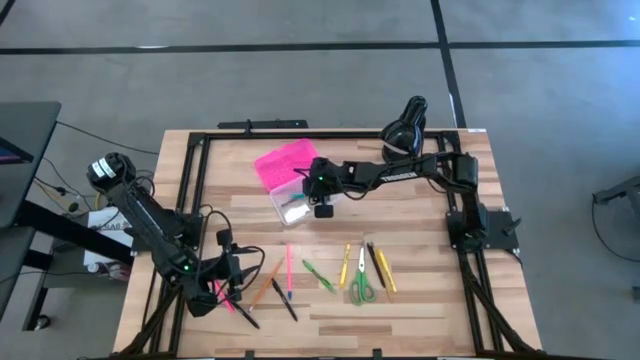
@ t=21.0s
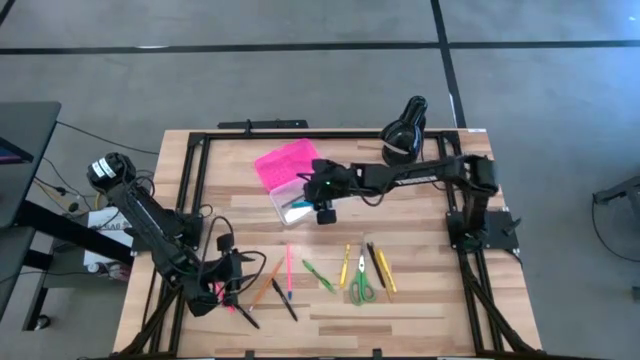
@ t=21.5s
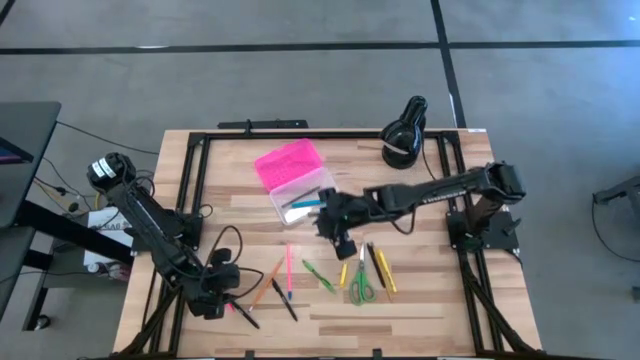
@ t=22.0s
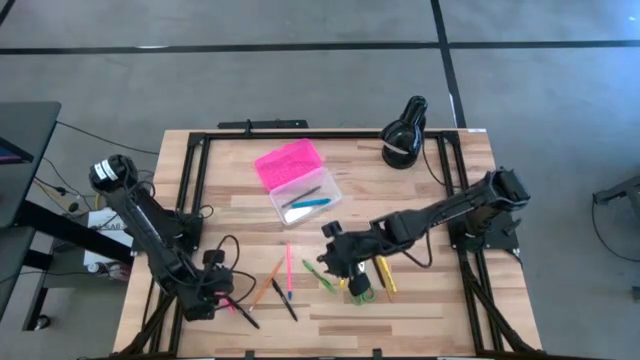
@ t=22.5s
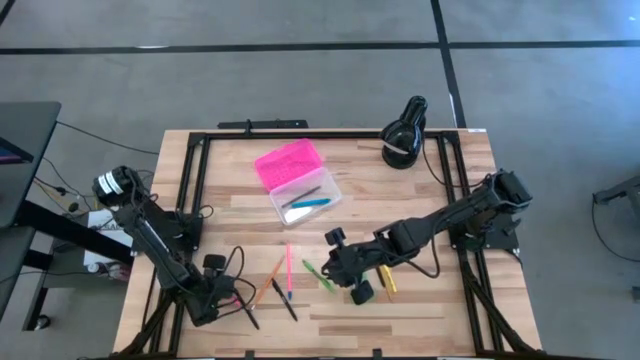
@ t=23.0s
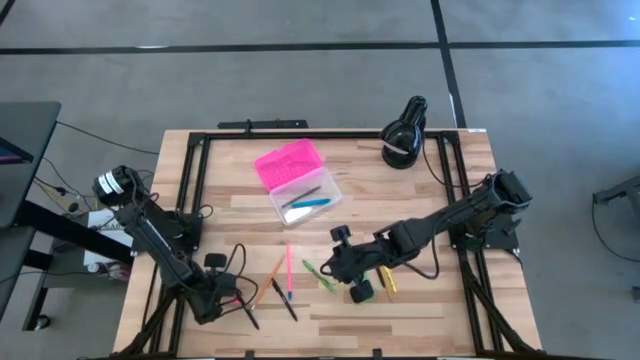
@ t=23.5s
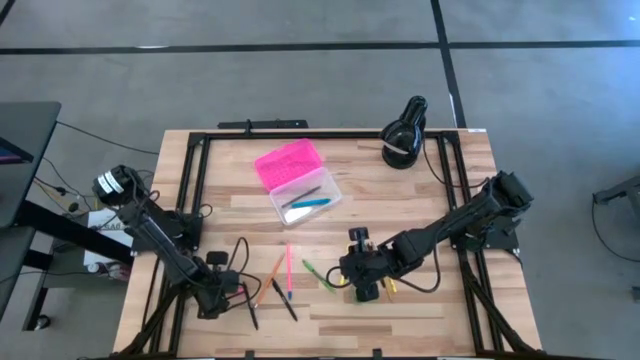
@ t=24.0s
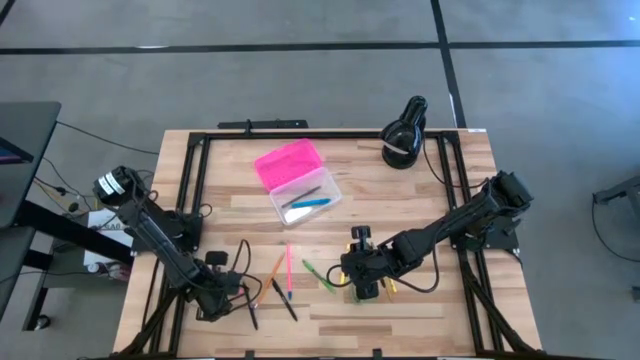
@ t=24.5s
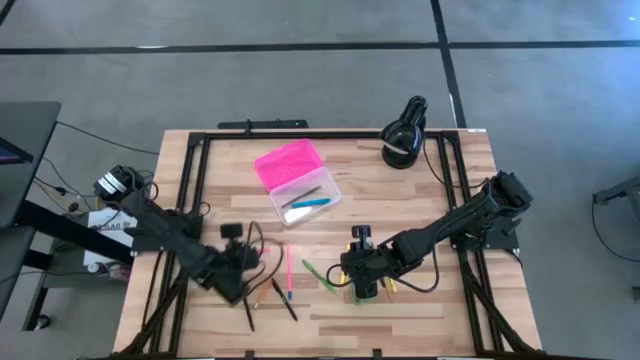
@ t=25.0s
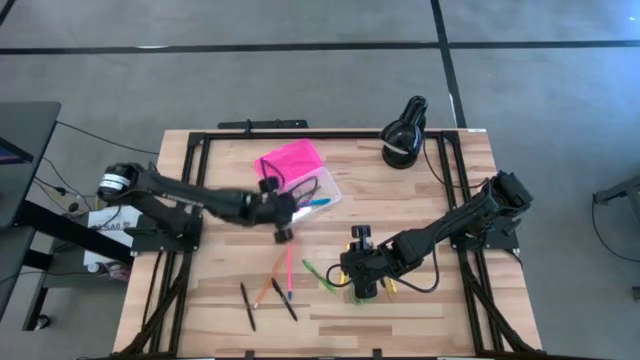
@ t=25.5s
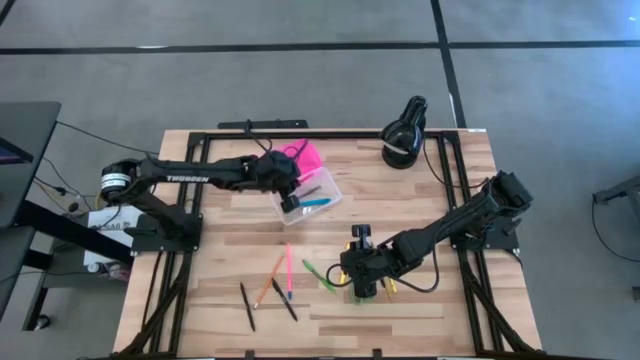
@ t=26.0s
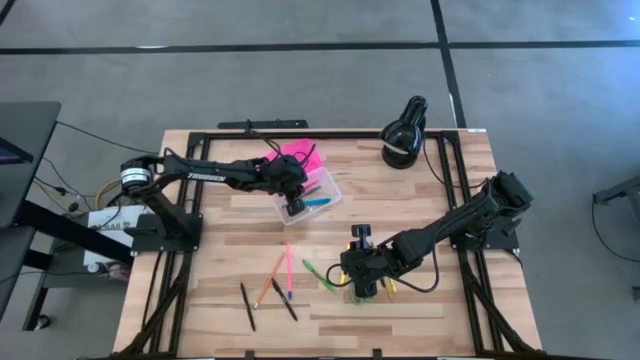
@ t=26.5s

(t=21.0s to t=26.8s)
Task: Pick & place school supplies into a supply box
Put the pink pen into the black supply box

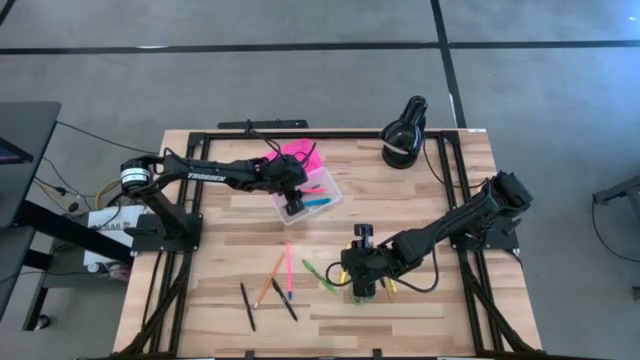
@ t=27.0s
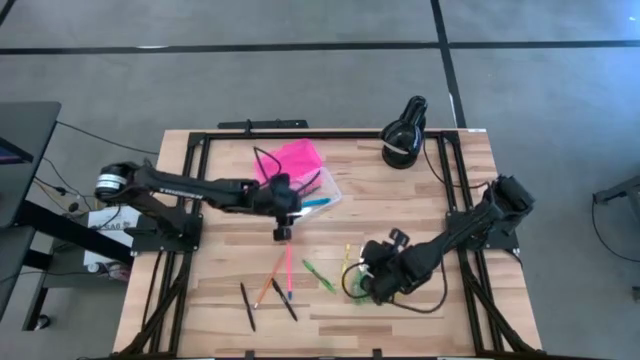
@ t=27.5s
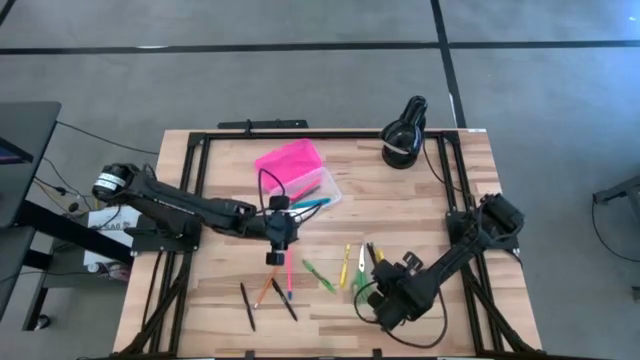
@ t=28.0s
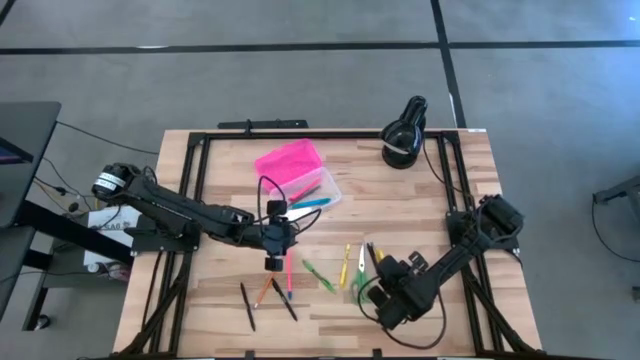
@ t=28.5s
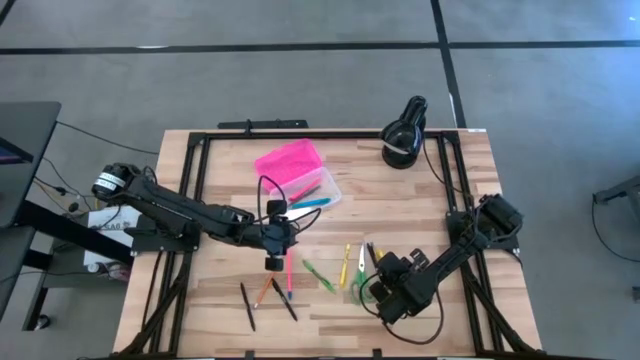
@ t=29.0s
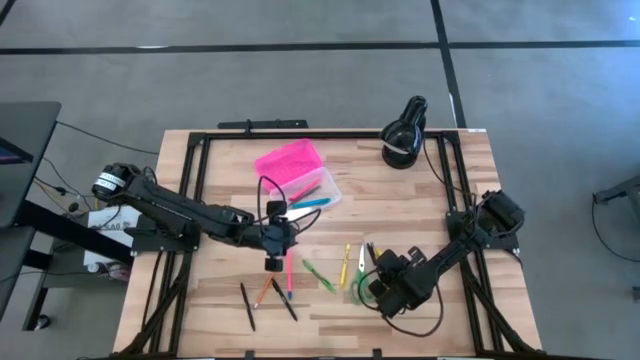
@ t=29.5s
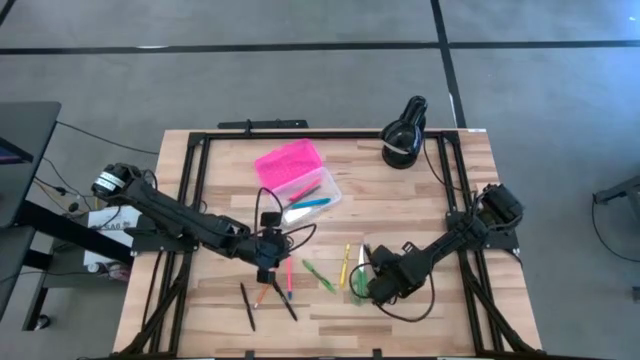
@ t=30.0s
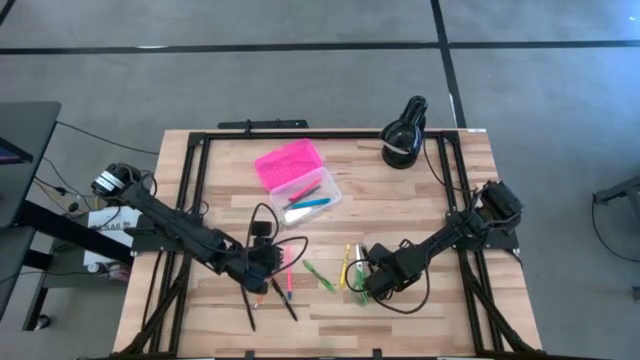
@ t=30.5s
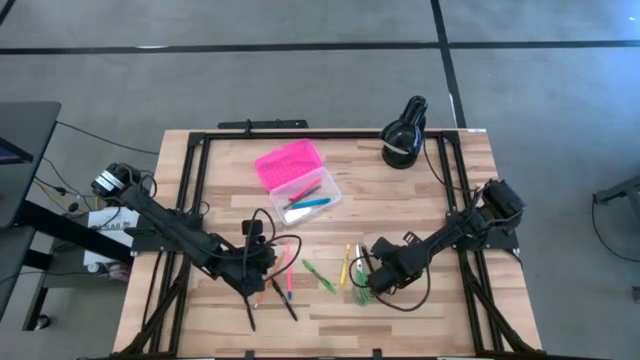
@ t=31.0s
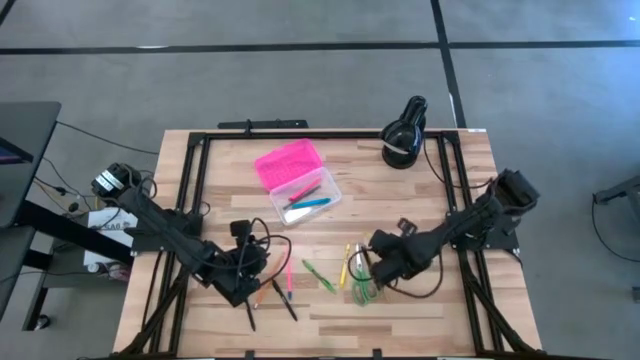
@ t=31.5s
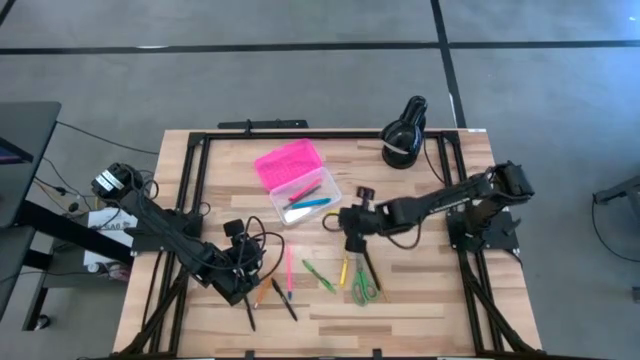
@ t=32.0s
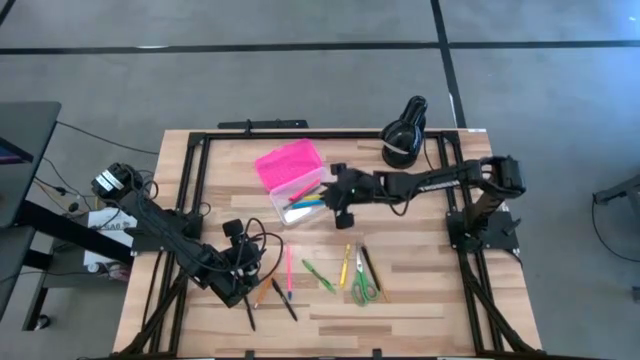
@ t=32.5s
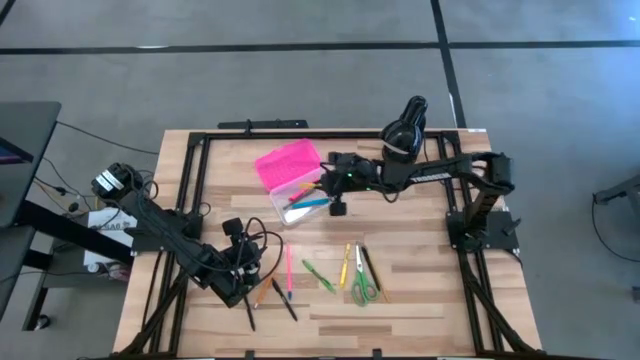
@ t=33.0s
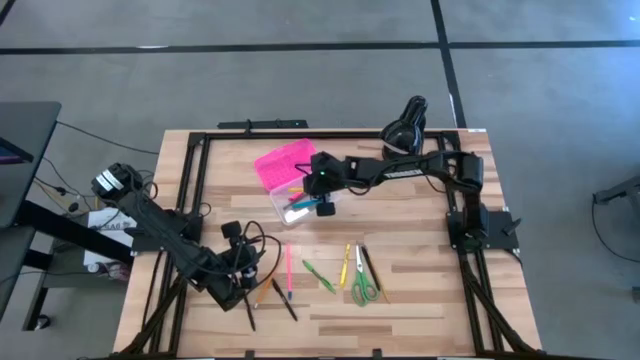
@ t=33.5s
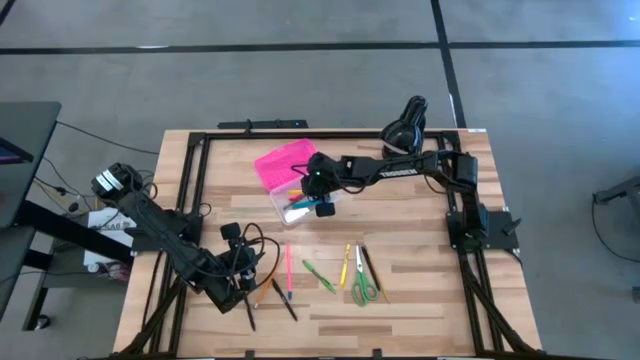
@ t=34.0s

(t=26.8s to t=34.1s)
Put the right yellow pen into the black supply box

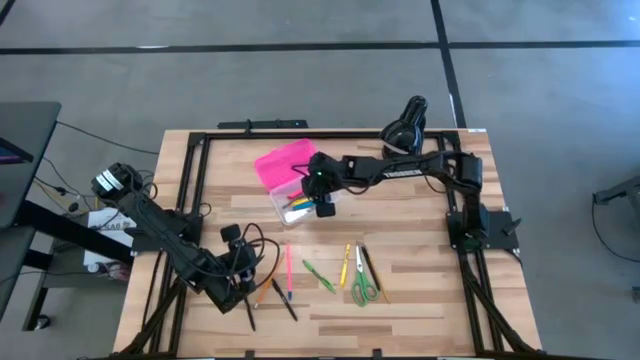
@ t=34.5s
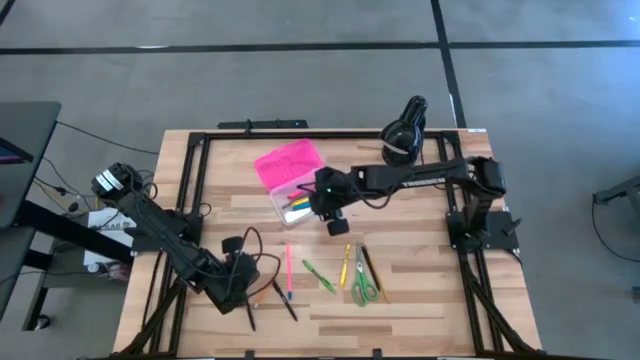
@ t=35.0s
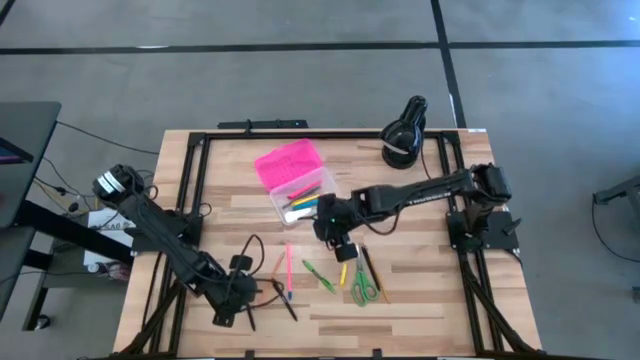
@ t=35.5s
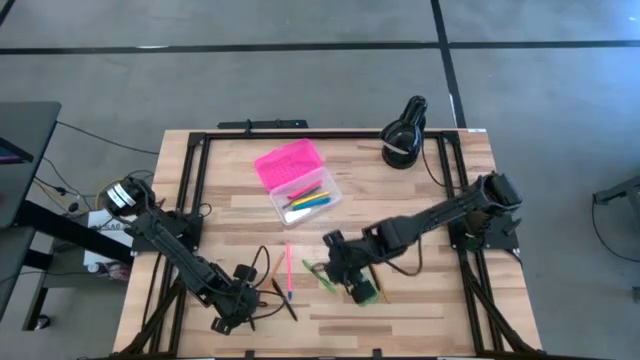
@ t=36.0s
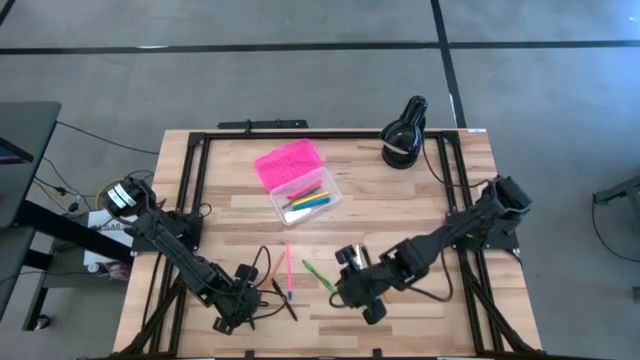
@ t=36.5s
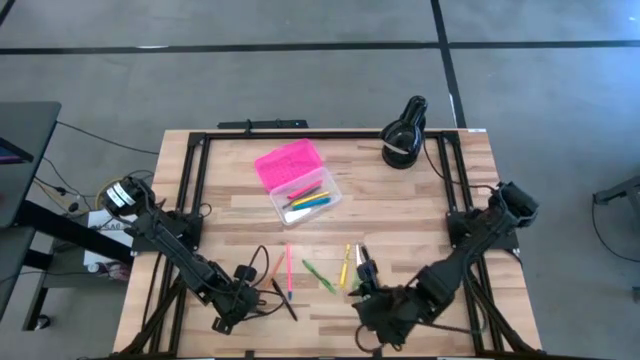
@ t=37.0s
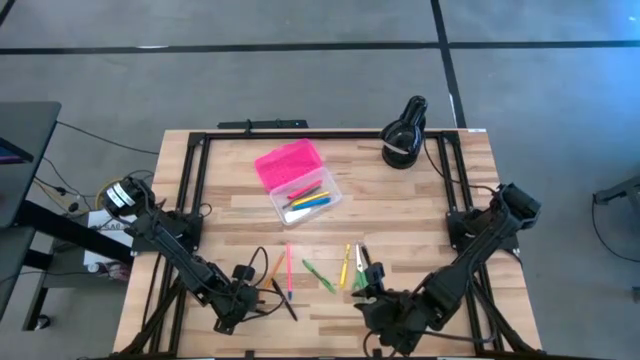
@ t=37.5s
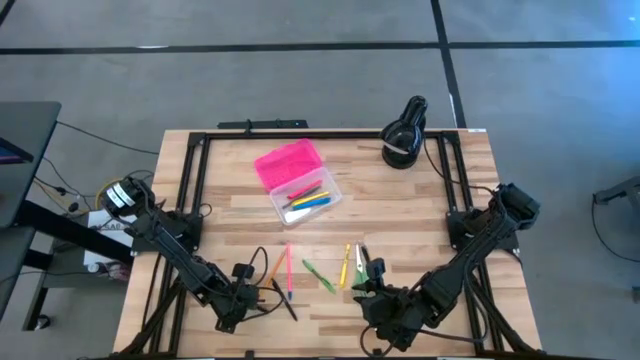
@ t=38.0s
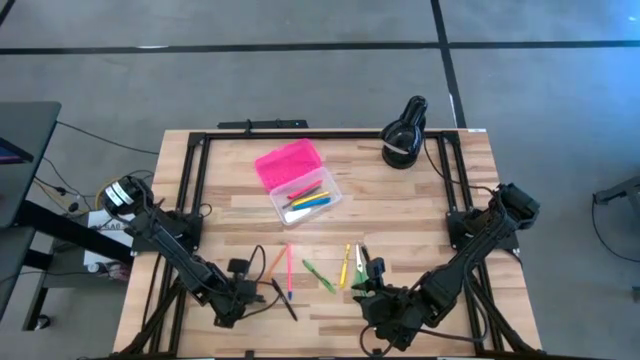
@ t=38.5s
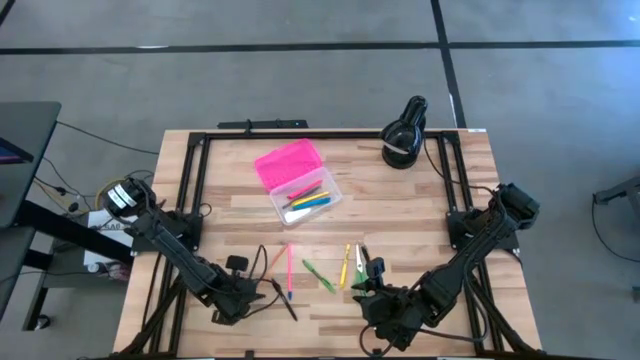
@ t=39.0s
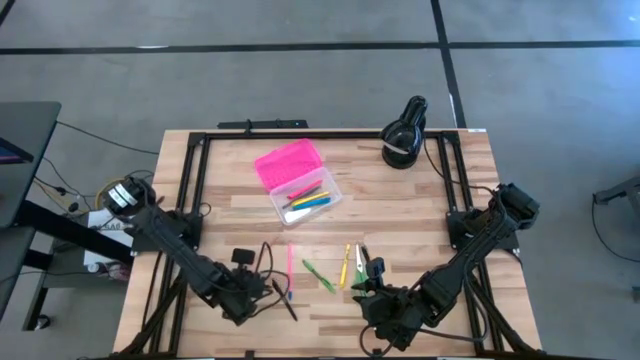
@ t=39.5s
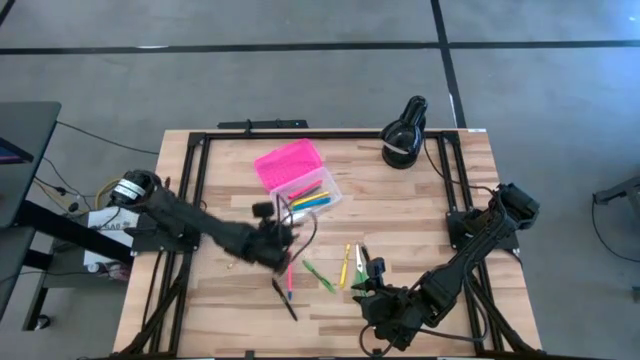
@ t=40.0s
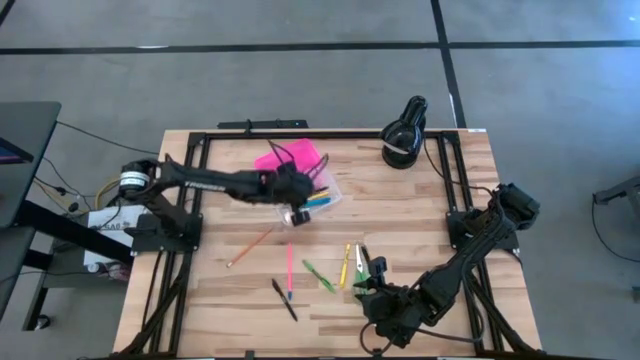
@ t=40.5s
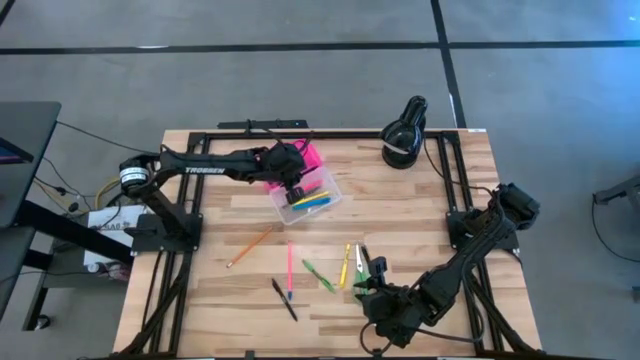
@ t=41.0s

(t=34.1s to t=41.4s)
Put the left black pen into the black supply box

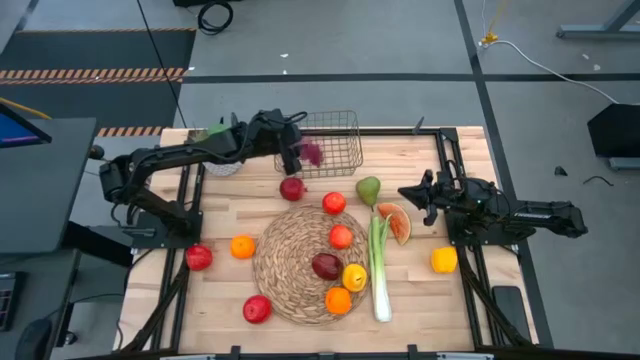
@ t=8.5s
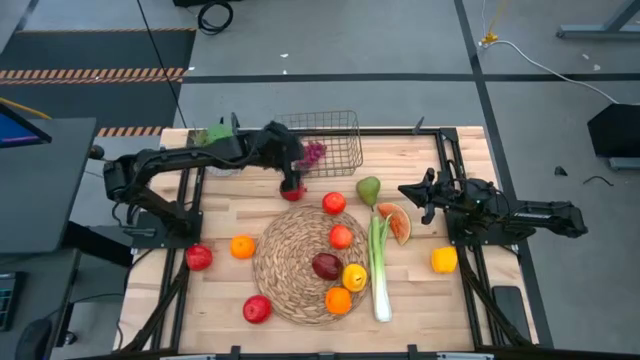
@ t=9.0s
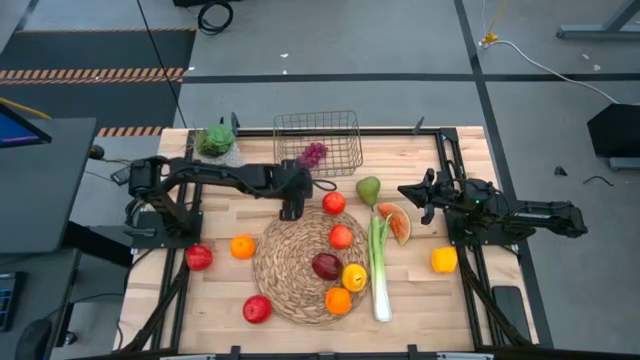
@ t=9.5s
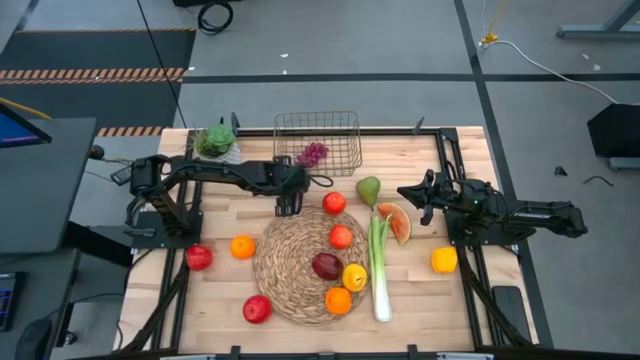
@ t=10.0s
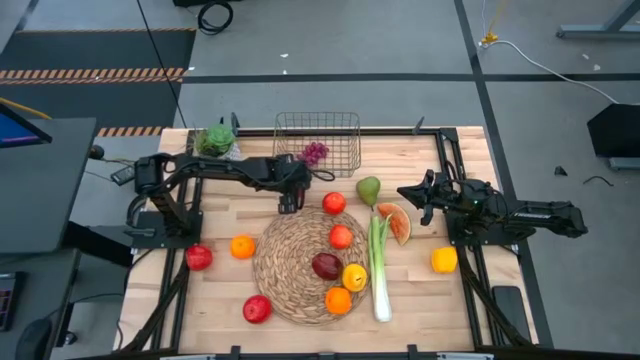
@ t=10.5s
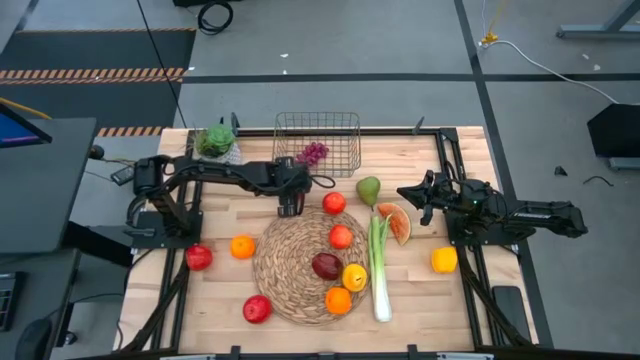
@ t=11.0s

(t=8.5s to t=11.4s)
Task: Build produce basket
Put the pomegranate into the wire basket
